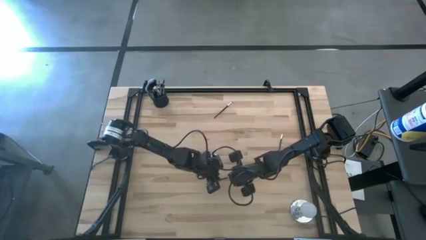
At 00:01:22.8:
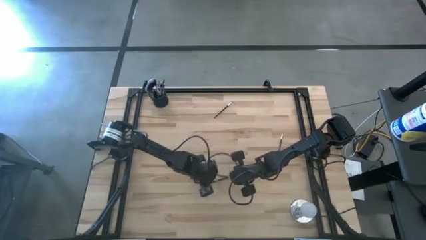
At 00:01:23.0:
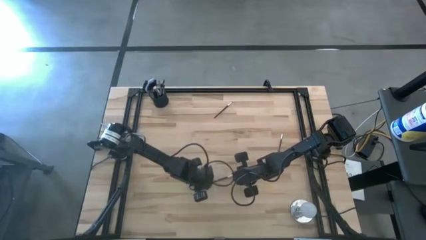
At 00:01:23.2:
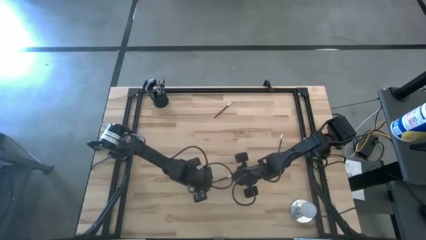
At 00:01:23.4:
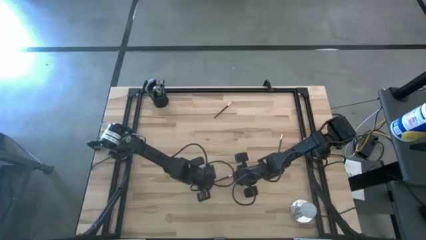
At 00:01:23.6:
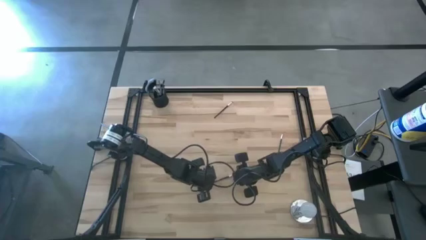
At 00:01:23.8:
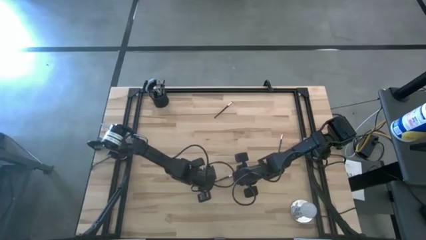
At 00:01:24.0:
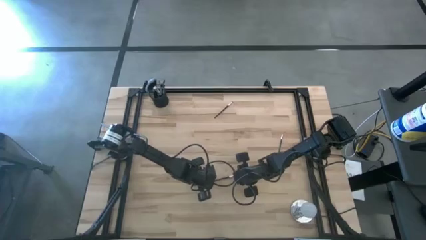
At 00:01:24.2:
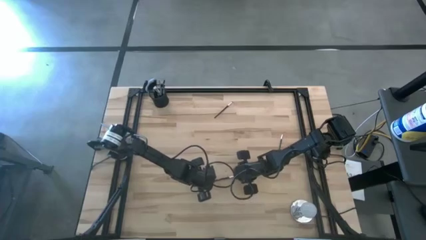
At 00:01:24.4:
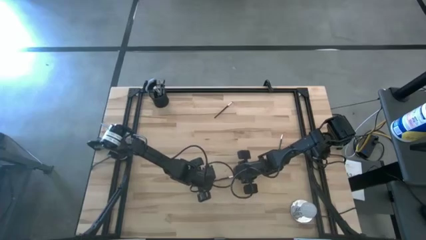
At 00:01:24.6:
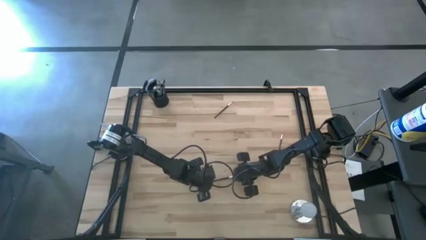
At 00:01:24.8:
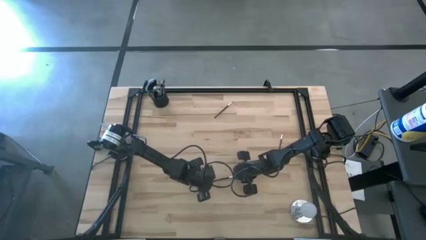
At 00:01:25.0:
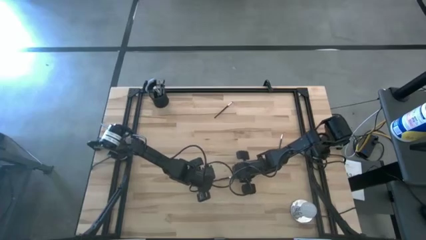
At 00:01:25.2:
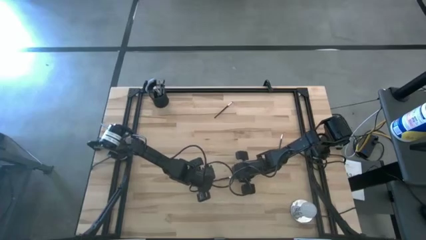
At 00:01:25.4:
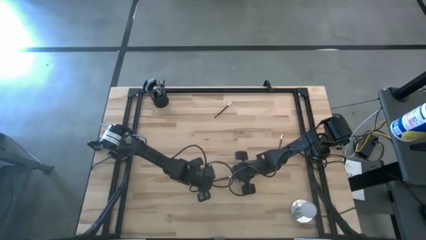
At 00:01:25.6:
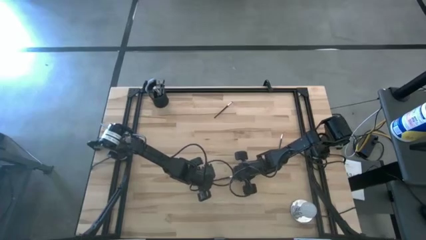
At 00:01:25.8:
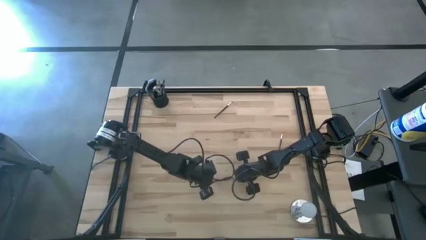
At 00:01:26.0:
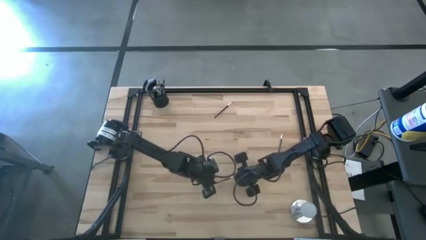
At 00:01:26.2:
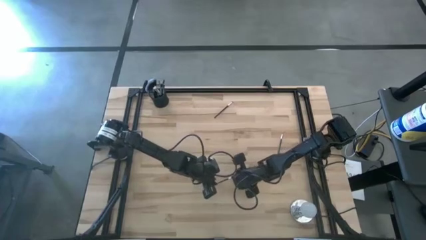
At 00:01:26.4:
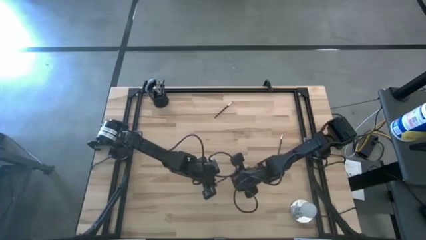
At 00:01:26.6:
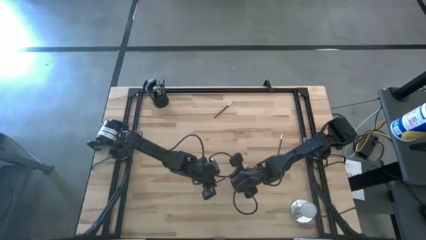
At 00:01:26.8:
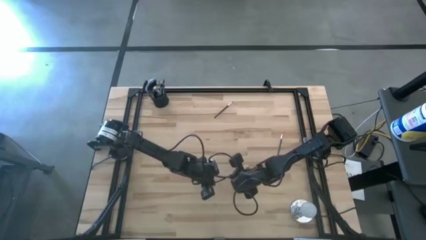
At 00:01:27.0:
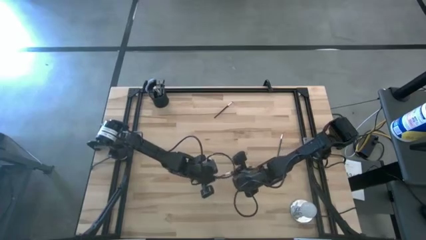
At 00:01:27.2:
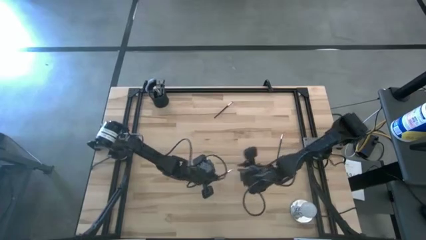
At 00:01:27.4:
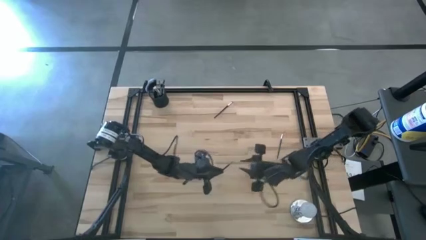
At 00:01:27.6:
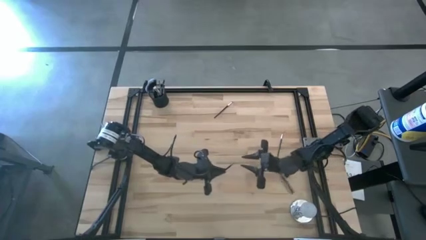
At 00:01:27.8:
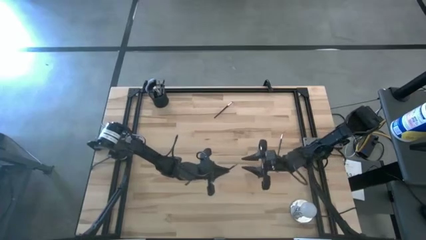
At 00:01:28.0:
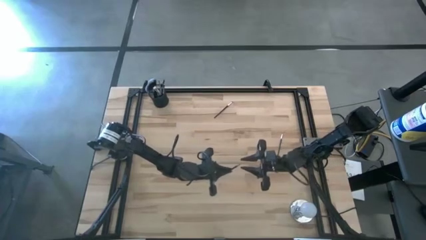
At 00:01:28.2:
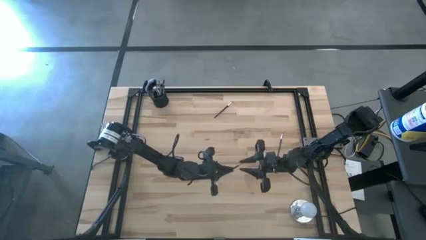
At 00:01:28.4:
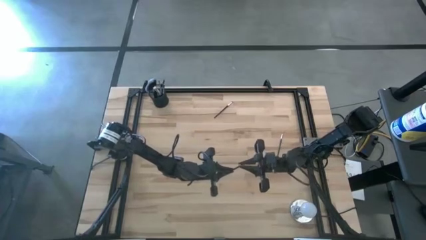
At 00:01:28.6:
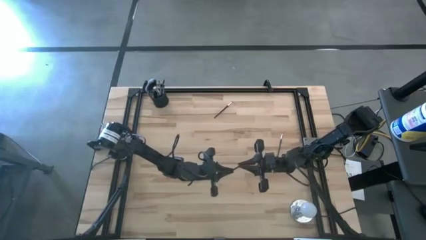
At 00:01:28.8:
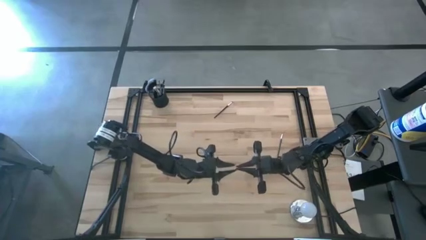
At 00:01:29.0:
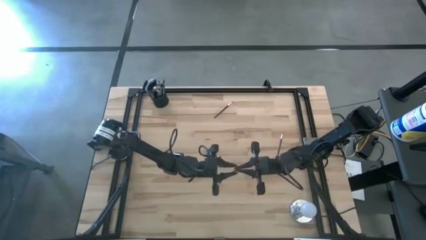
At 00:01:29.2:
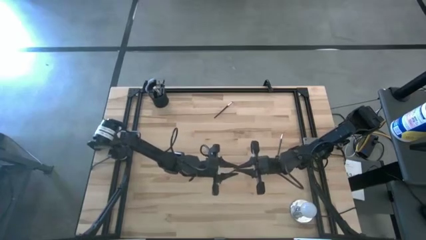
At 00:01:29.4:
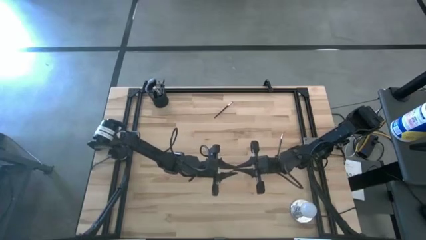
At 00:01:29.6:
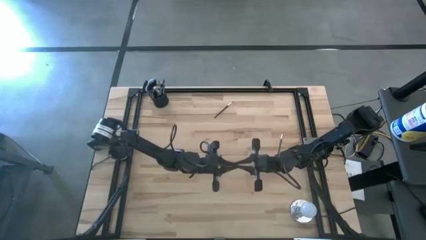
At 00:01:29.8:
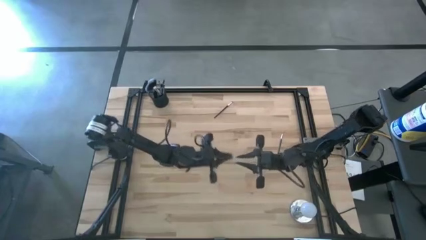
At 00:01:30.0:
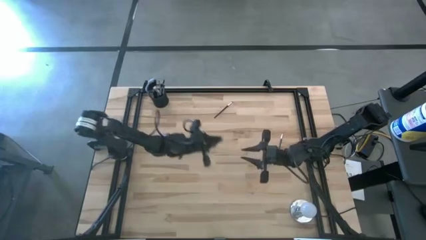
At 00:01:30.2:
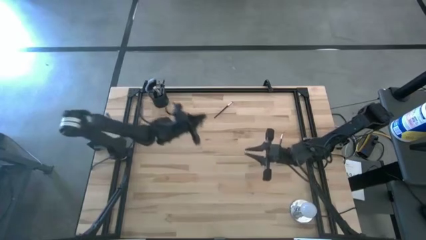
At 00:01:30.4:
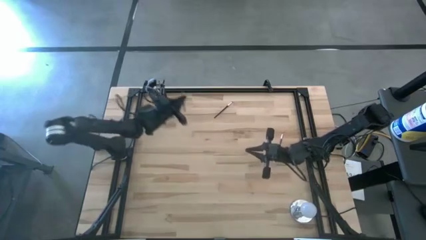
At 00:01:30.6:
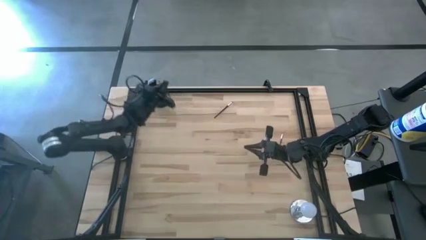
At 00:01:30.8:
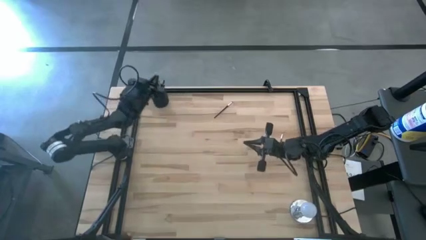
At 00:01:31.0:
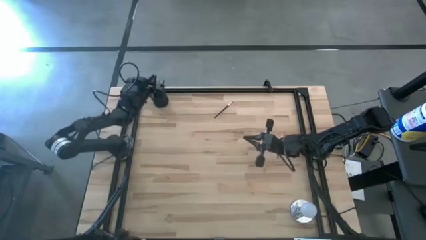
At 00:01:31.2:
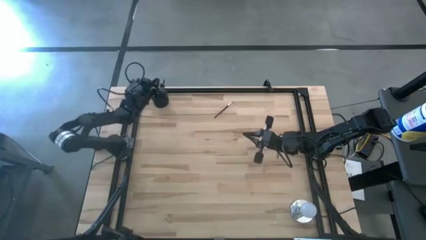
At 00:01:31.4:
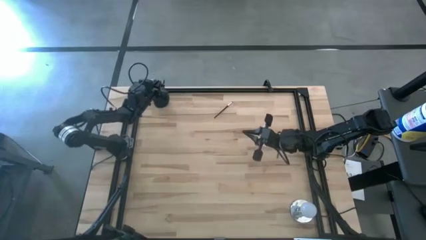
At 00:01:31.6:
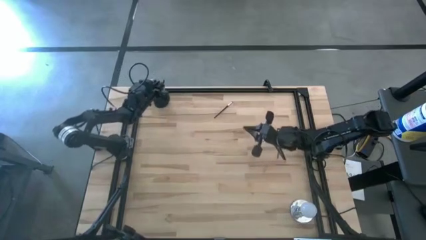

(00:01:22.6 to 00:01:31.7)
Task: Put items in baskets/containers
Put the liner brush into the holder

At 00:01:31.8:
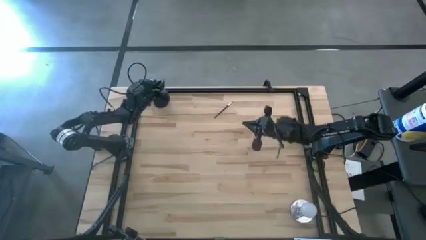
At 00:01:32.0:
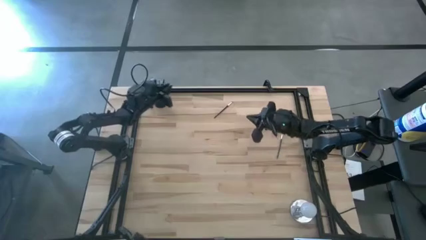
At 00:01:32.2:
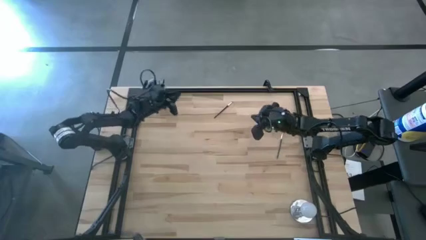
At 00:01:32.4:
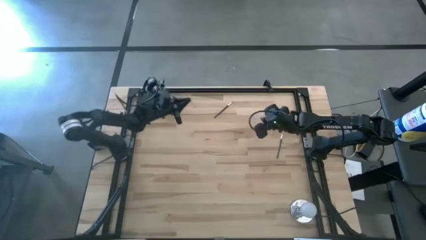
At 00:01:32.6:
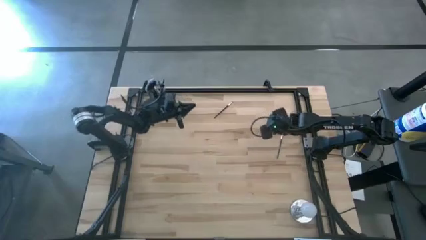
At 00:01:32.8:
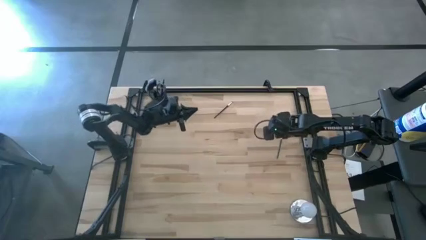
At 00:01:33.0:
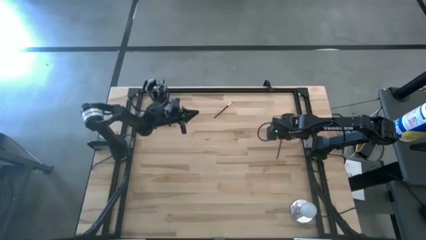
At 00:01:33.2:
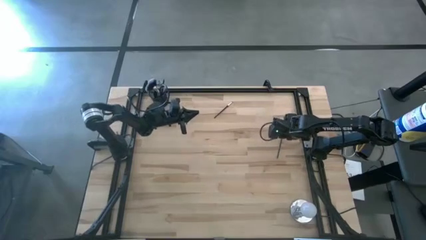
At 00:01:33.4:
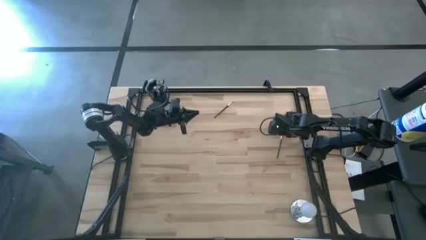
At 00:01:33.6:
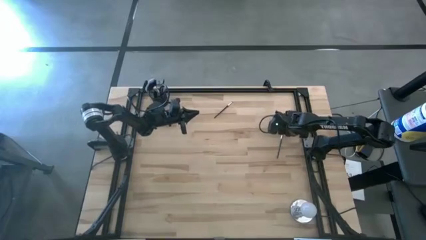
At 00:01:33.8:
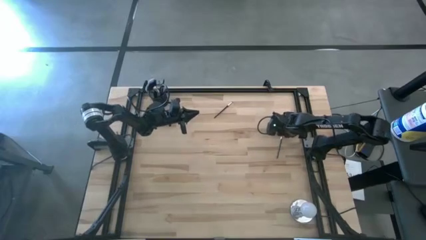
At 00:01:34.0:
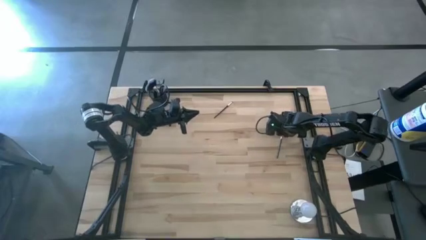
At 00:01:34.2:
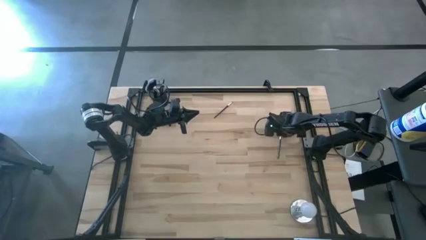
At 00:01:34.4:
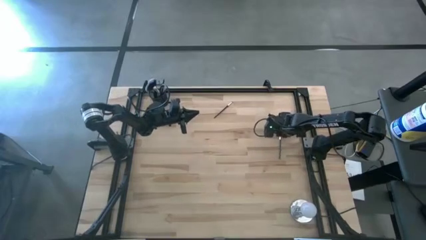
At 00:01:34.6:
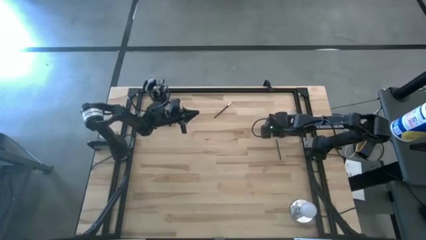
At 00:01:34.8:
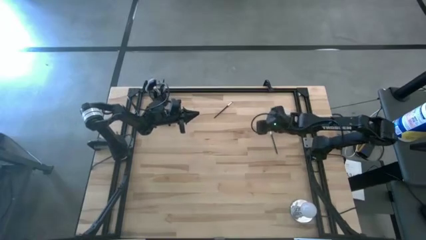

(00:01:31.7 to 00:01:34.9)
Put the eyeshadow brush into the holder

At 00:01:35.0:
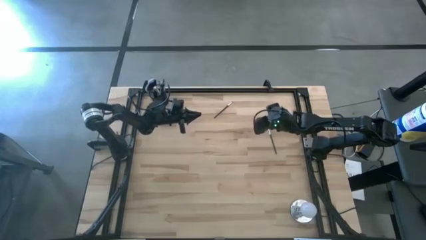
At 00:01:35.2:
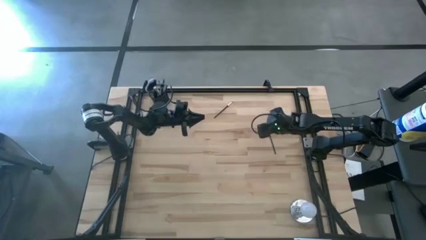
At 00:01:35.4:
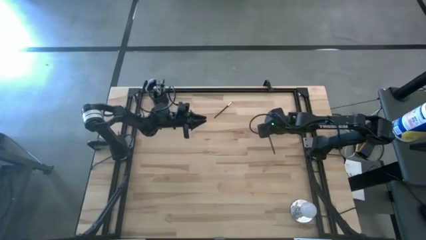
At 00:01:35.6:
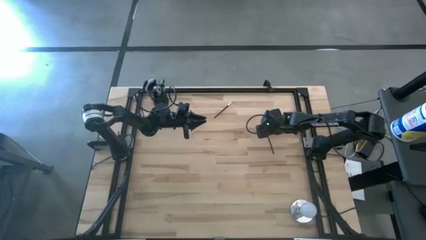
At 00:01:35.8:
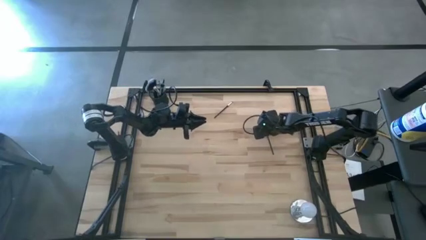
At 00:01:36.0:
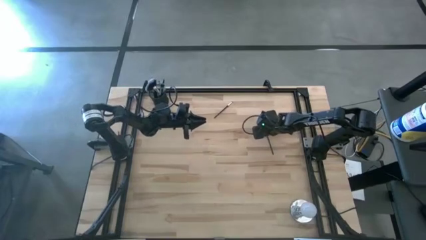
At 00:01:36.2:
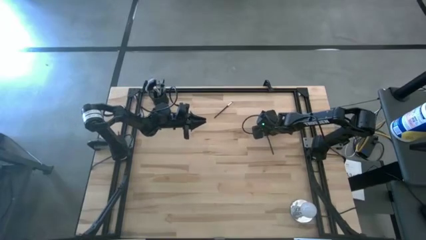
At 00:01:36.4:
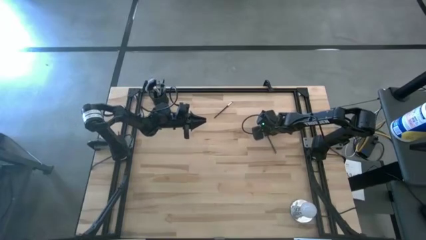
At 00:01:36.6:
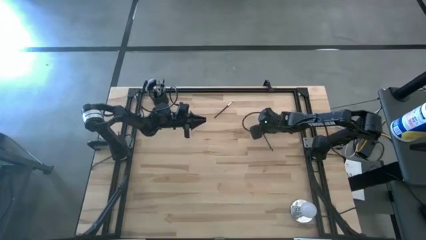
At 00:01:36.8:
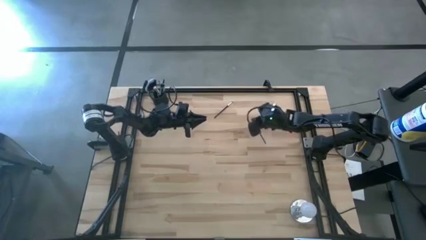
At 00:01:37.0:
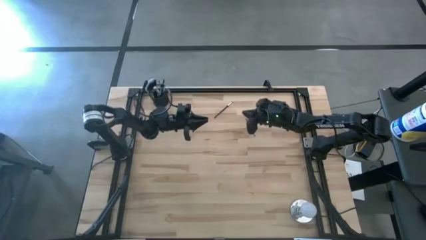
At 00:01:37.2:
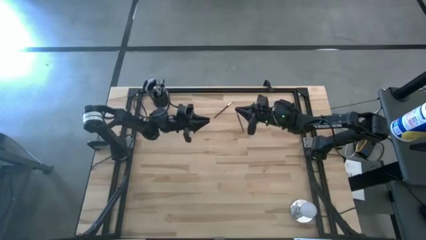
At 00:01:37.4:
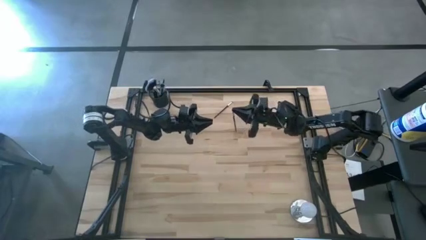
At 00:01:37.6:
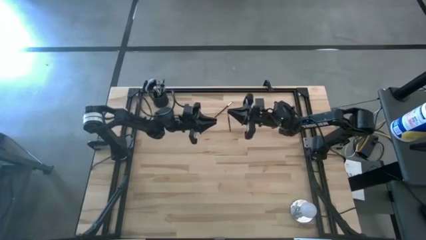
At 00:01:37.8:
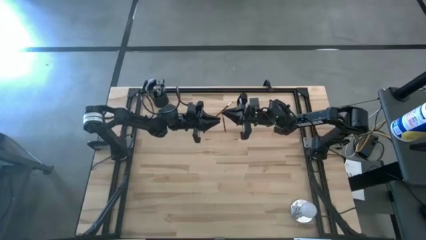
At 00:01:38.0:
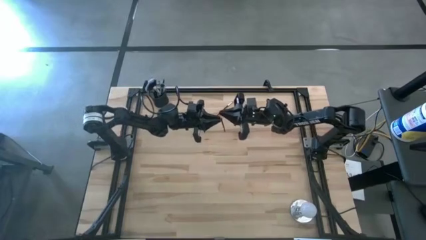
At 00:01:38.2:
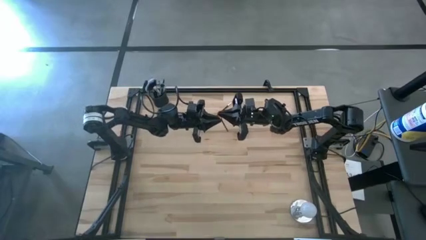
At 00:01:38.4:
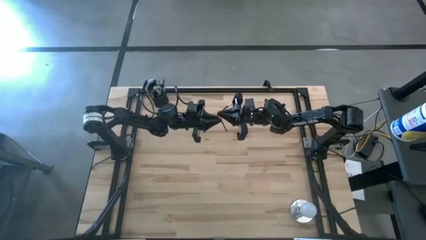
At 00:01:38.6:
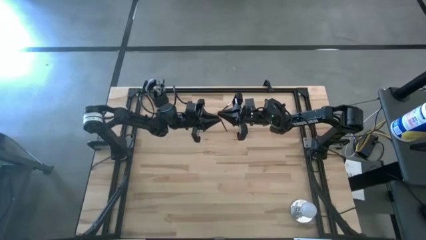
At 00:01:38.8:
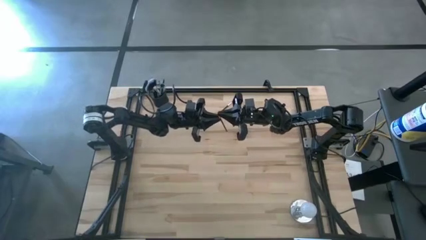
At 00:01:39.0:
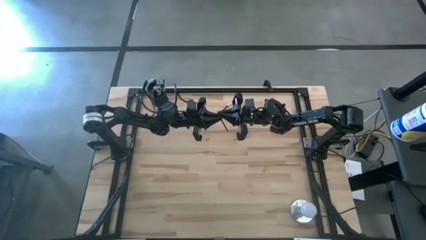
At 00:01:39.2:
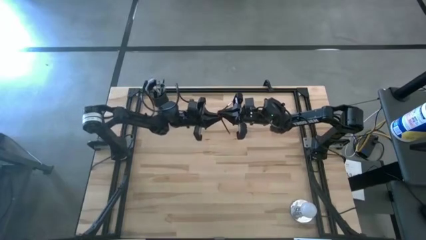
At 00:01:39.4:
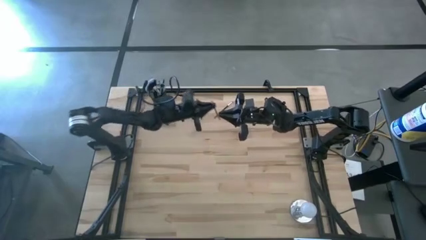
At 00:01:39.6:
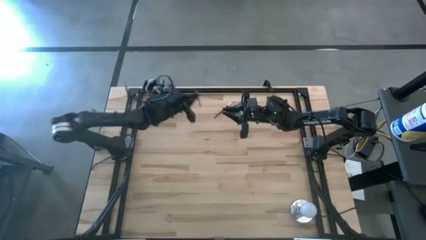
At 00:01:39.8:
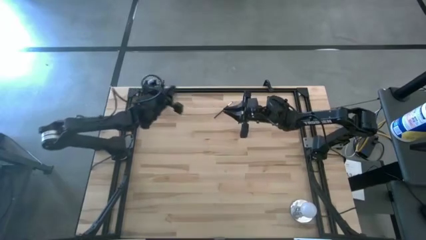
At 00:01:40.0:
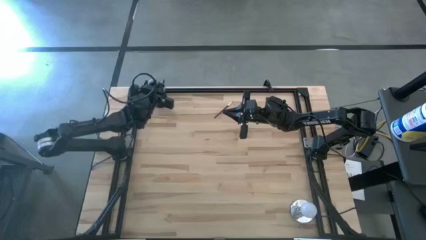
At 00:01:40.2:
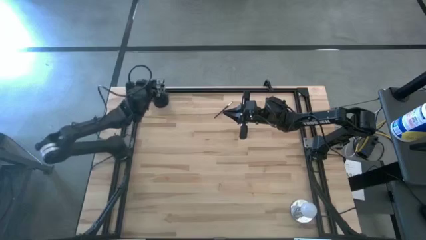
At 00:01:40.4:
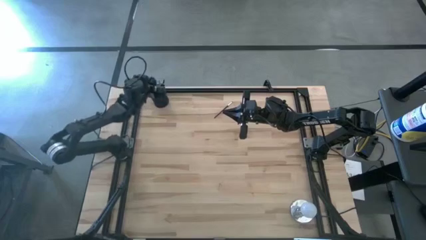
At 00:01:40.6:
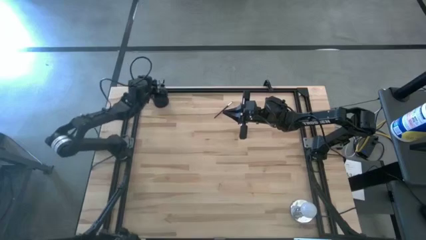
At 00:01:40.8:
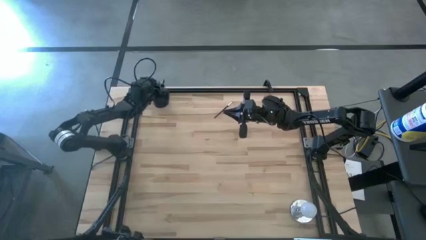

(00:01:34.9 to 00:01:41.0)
Put the eyeshadow brush into the holder
